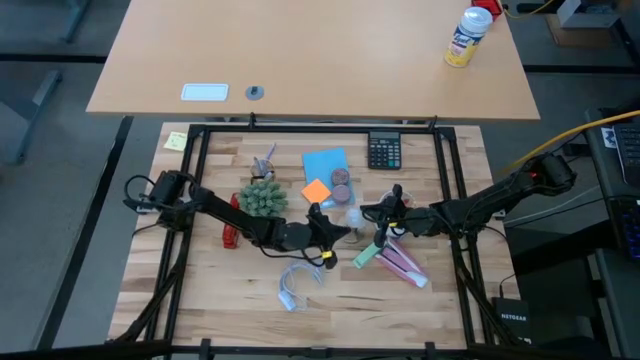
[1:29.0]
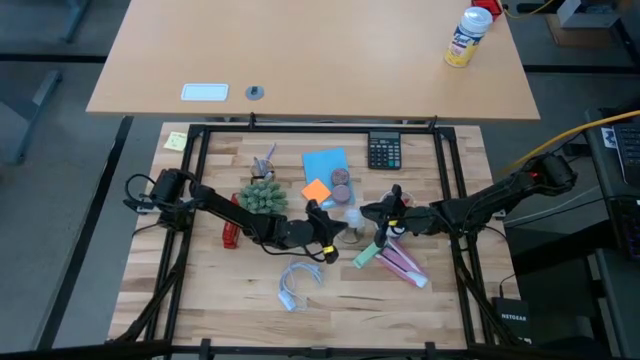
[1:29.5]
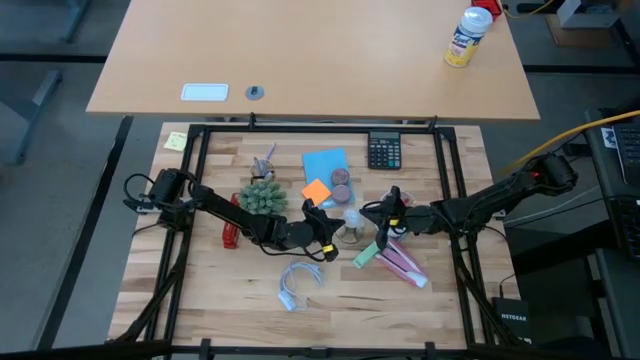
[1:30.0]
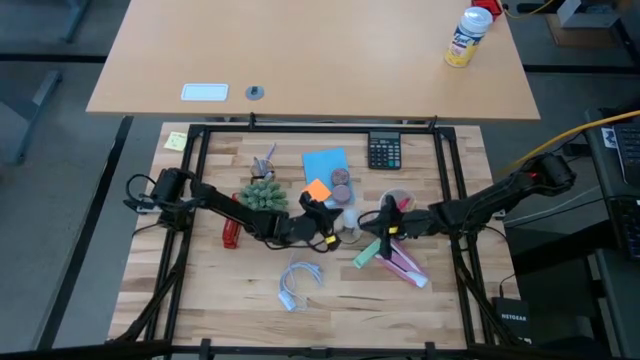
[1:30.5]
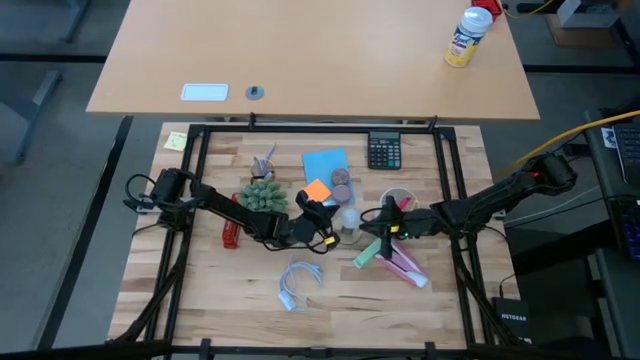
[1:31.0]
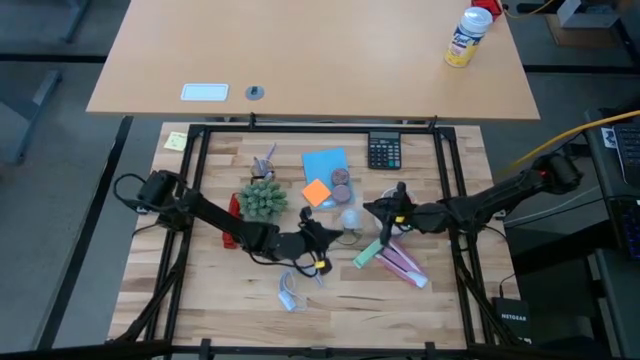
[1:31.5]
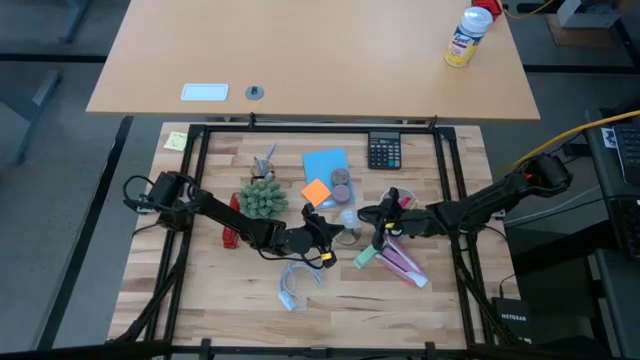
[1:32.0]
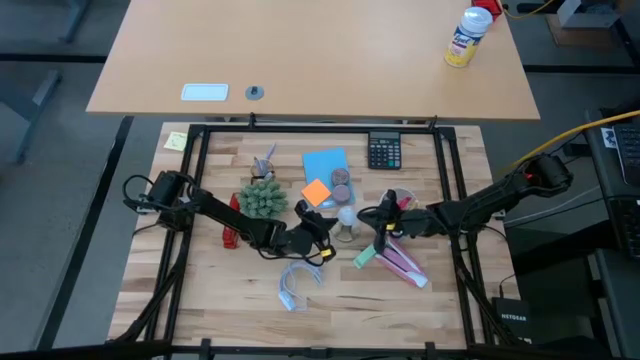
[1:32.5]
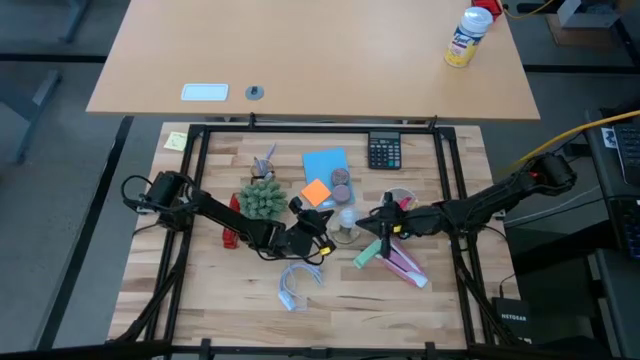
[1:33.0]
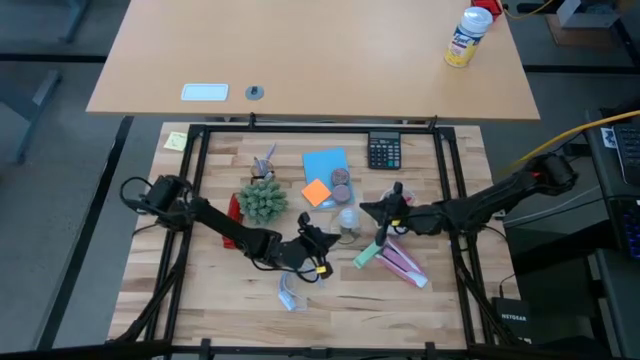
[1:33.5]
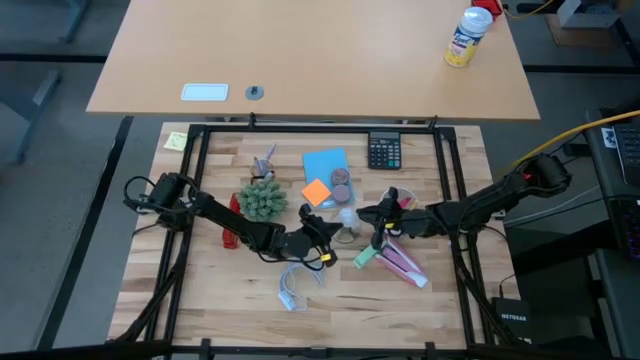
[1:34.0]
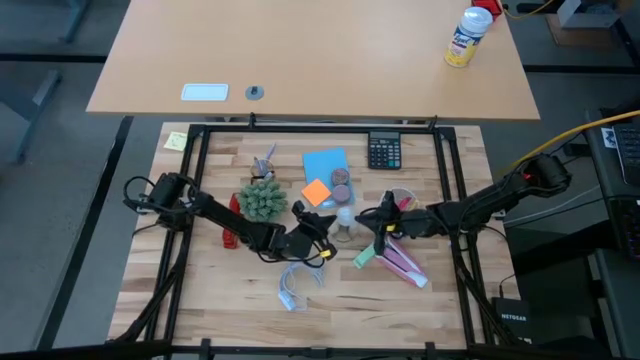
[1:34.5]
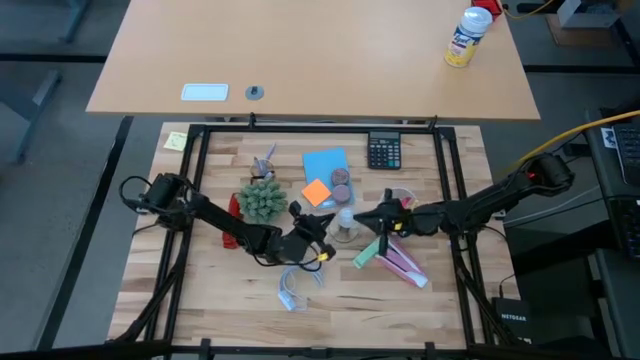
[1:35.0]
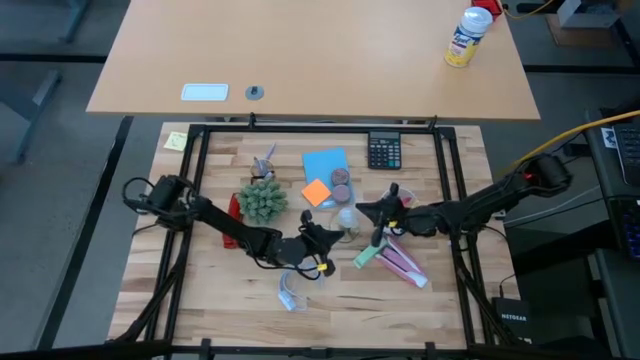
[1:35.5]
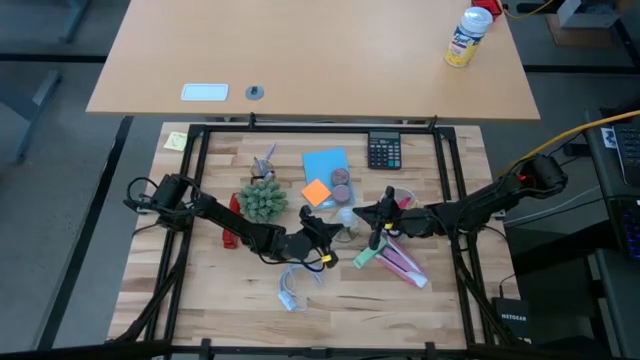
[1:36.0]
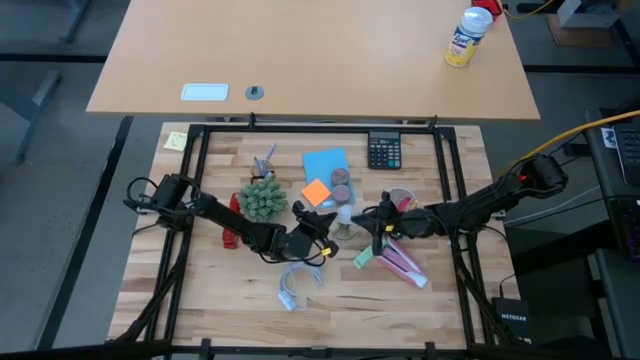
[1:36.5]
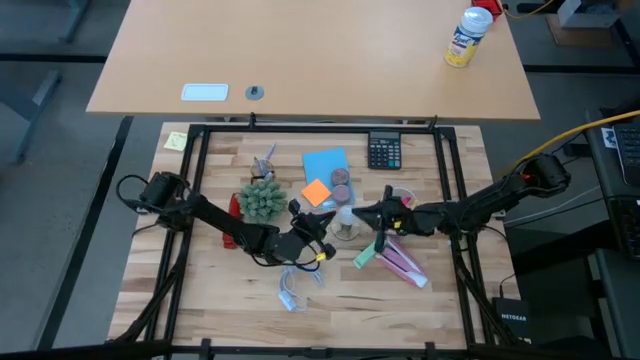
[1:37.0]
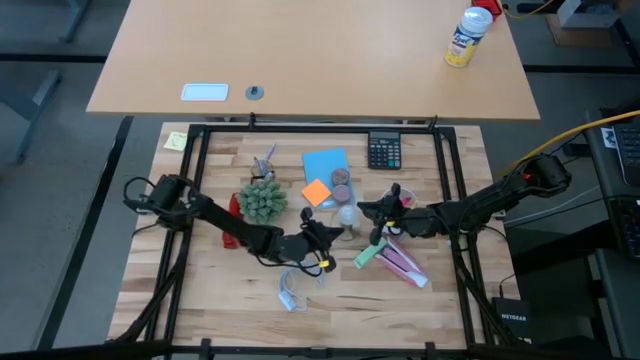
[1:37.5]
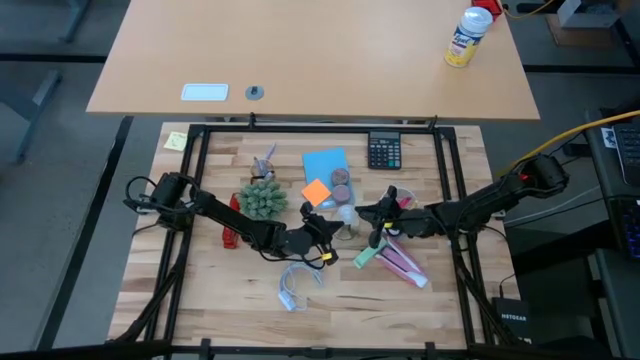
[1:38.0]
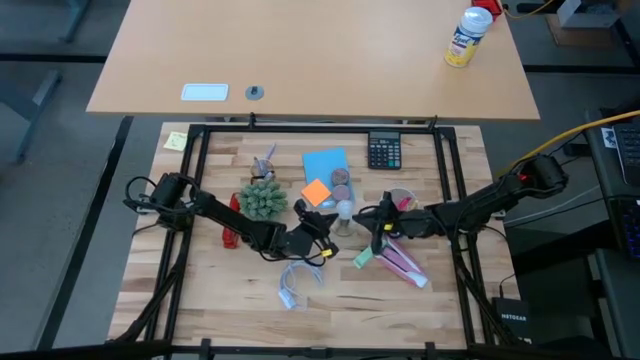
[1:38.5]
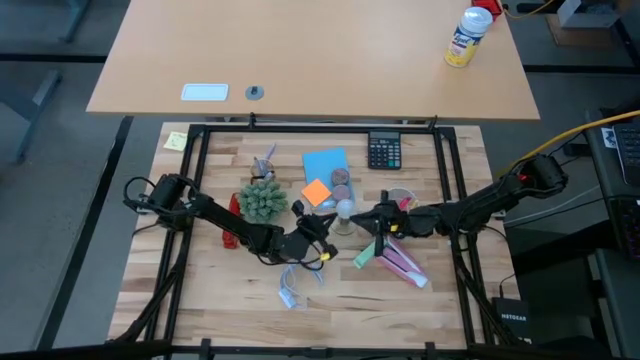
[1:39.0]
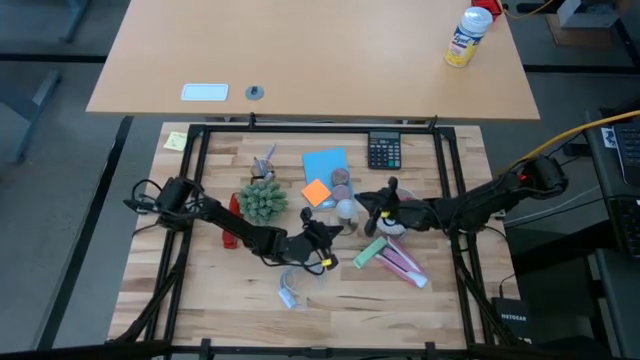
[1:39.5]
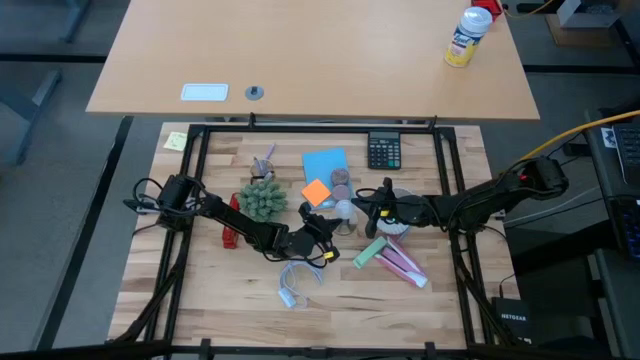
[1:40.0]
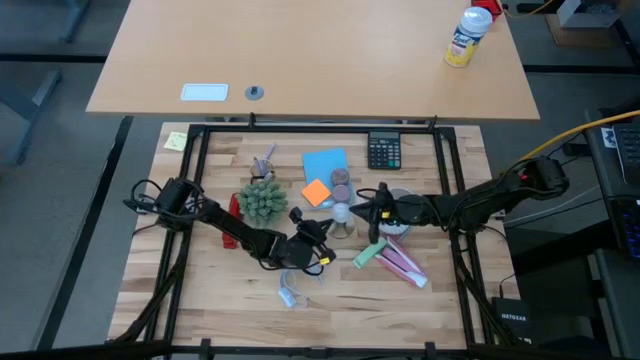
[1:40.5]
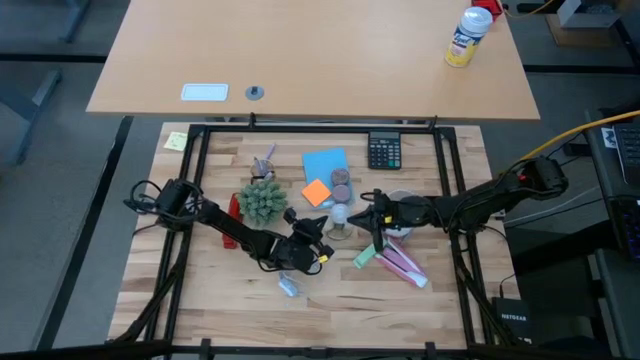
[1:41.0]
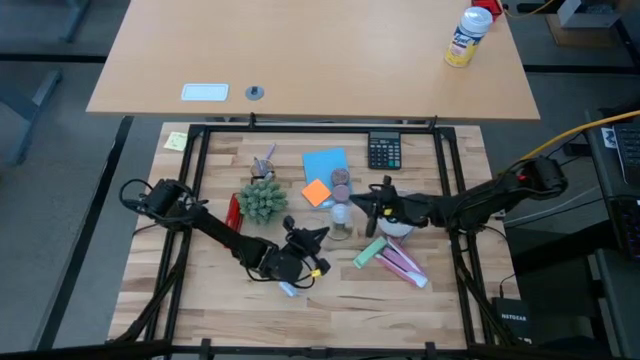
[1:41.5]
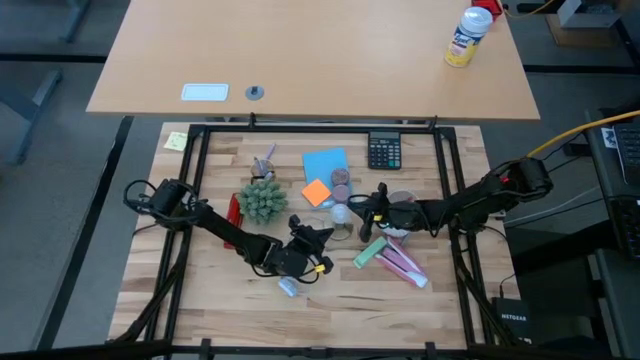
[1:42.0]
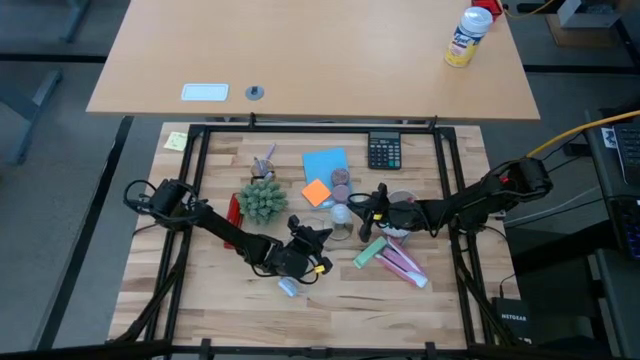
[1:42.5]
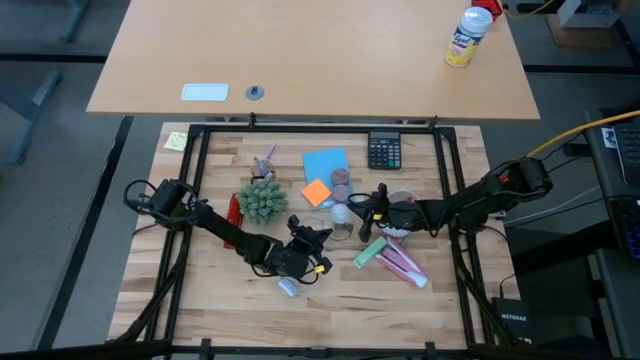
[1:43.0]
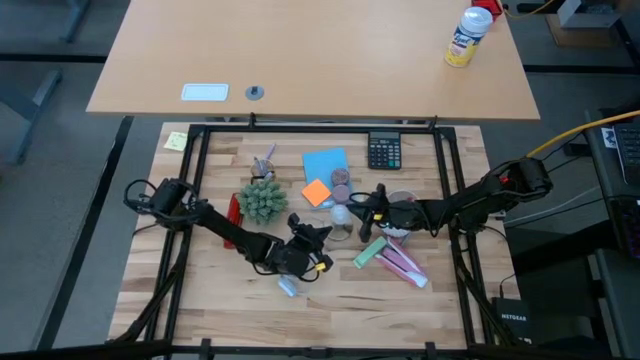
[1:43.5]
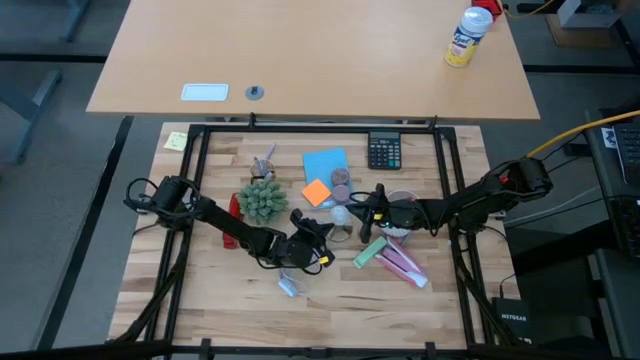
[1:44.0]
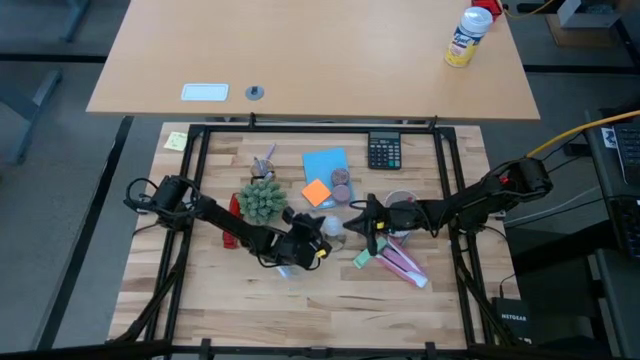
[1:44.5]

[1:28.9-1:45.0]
Task: Screw lightbulb
Insert the white lightbulb into the lamp socket

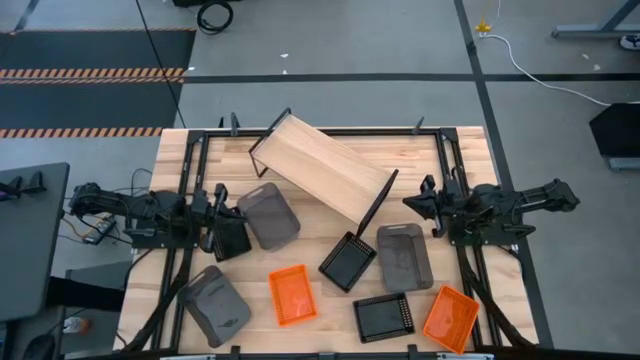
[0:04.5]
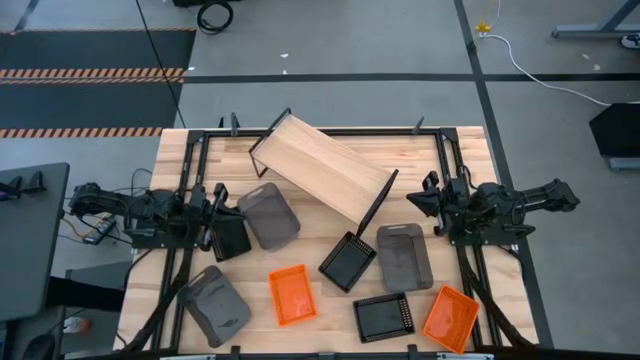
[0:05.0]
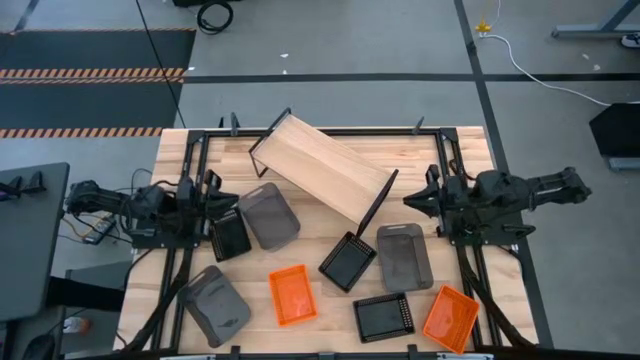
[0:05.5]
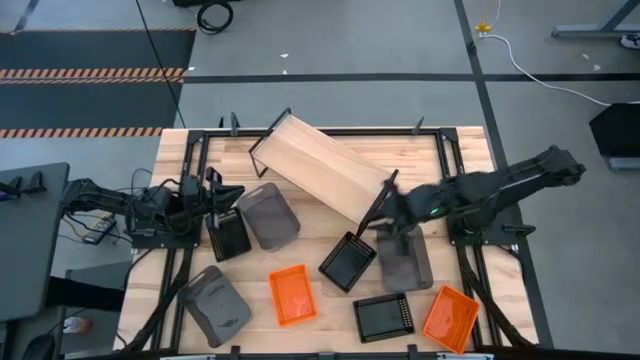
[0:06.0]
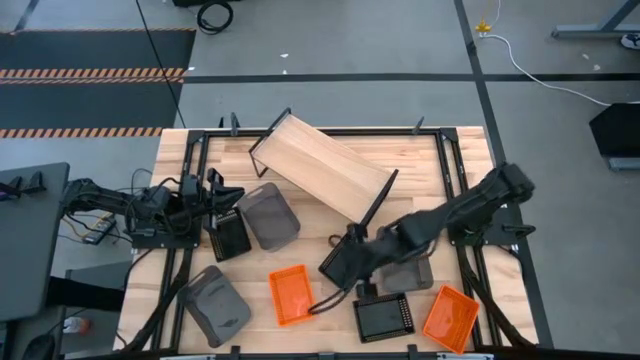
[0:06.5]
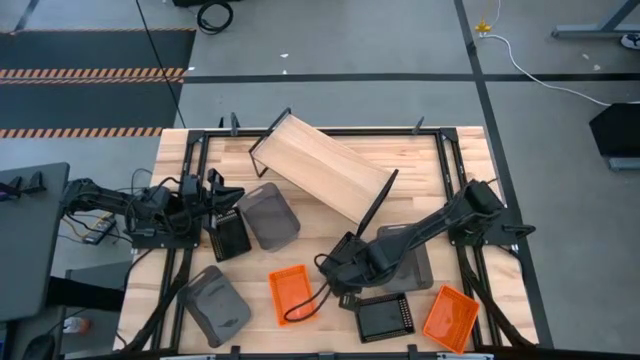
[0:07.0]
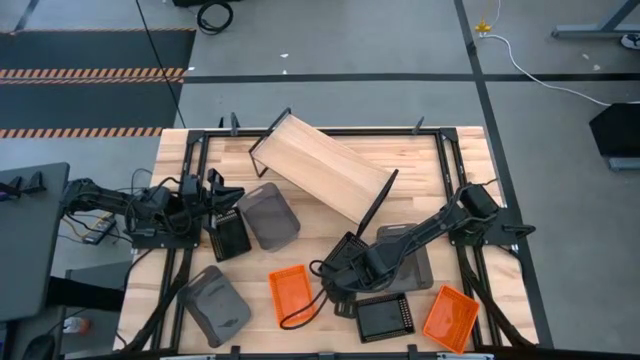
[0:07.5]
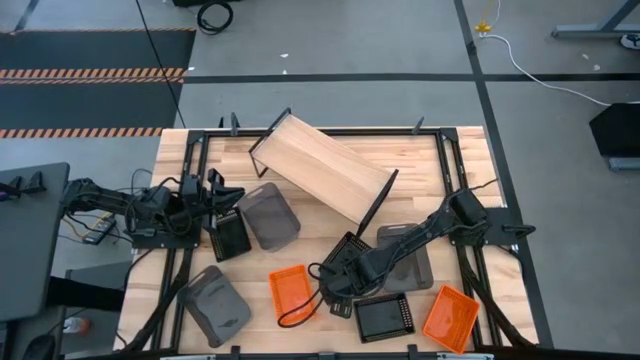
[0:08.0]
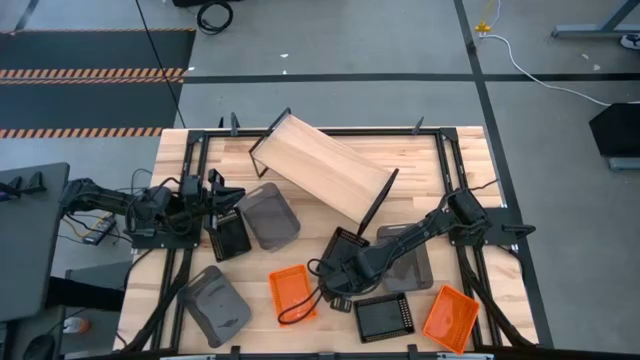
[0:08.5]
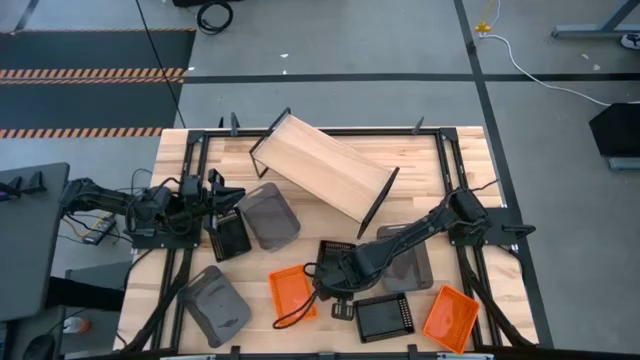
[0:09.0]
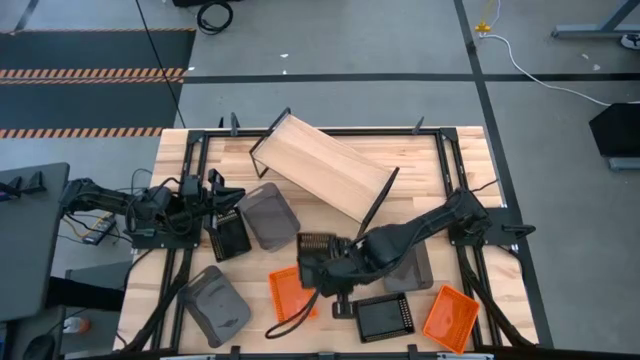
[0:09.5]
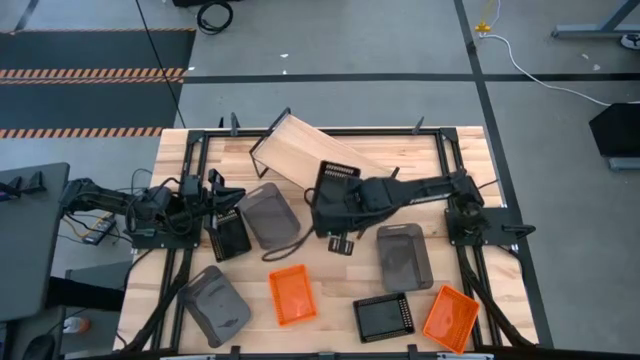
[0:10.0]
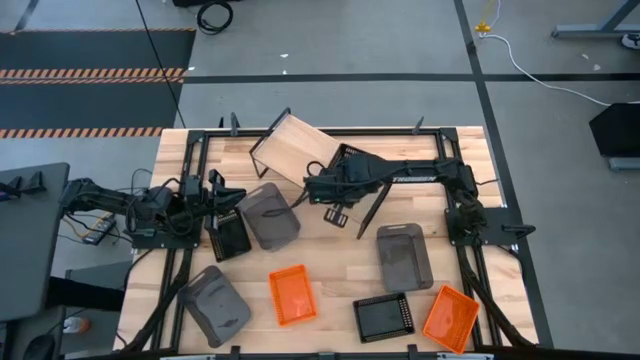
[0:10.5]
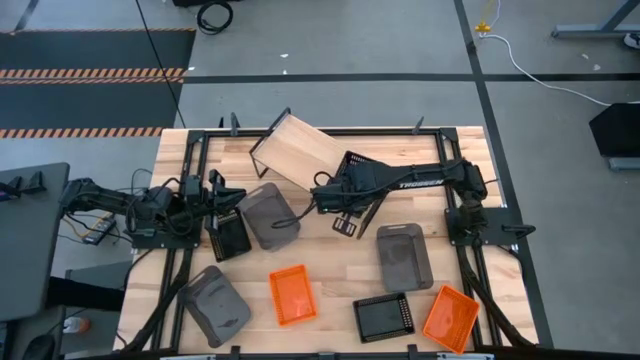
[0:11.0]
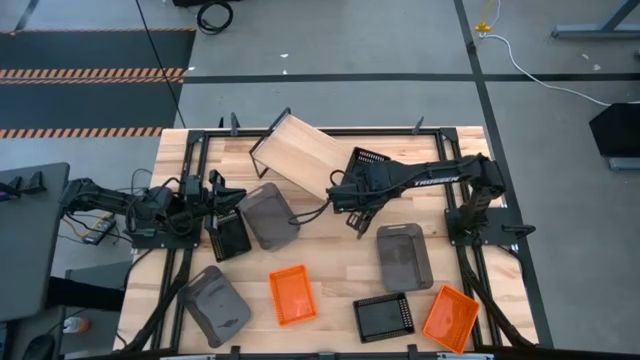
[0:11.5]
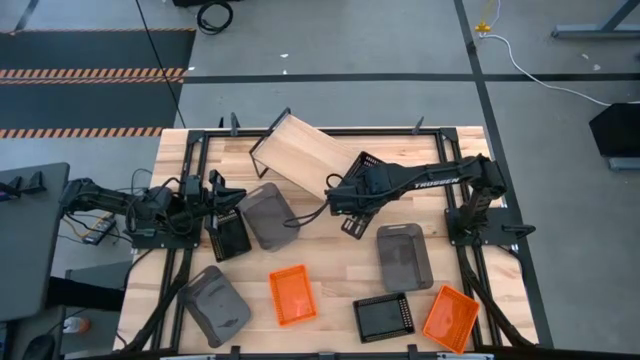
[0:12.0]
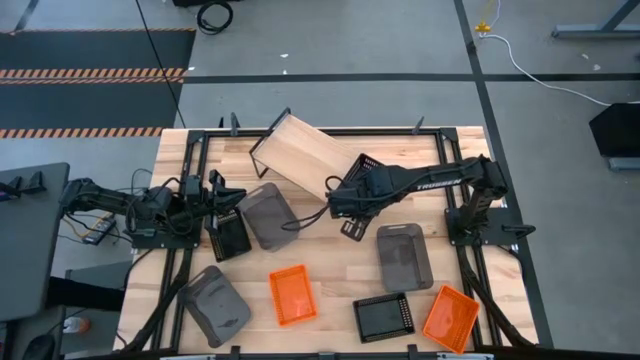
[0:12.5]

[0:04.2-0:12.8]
Task: Stack baskets on shelf by color
Put the middle black basket on the shelf
